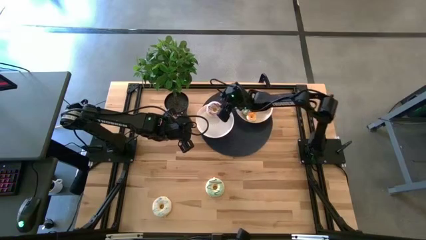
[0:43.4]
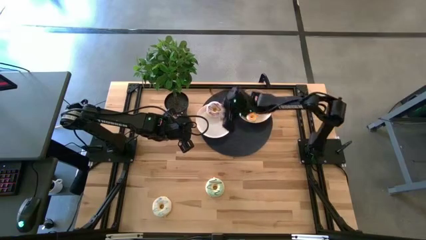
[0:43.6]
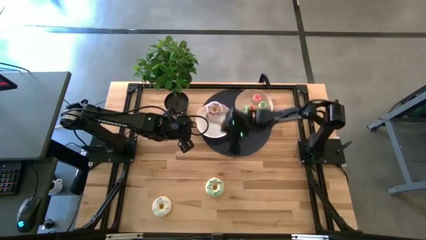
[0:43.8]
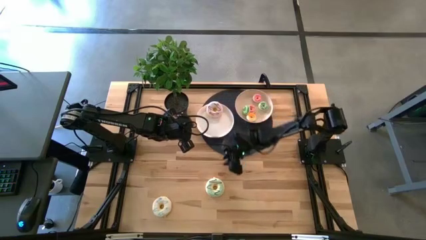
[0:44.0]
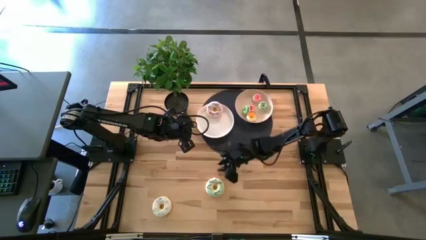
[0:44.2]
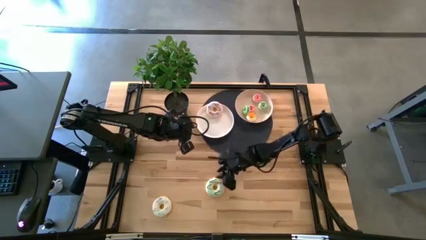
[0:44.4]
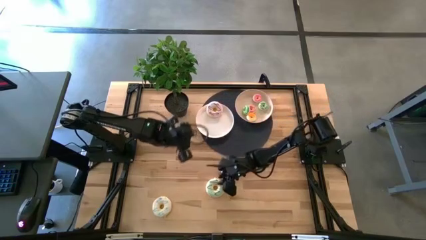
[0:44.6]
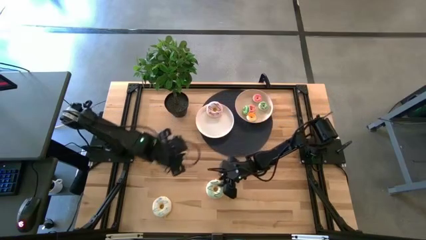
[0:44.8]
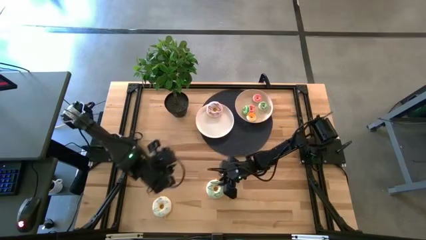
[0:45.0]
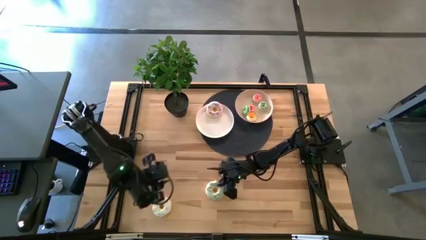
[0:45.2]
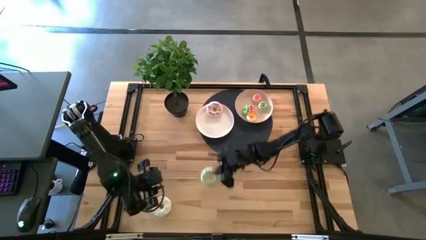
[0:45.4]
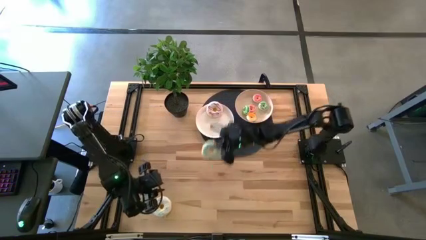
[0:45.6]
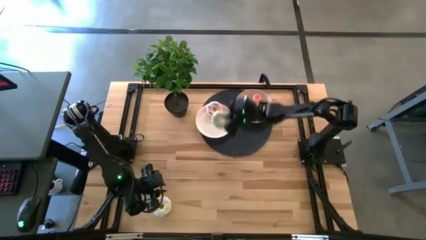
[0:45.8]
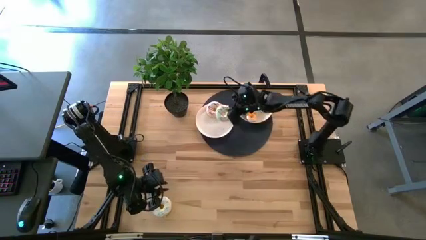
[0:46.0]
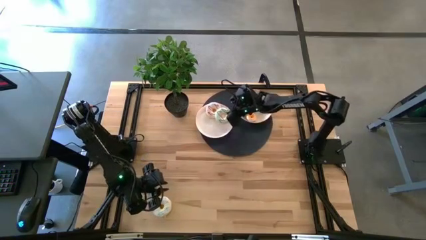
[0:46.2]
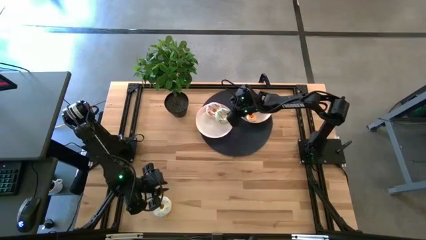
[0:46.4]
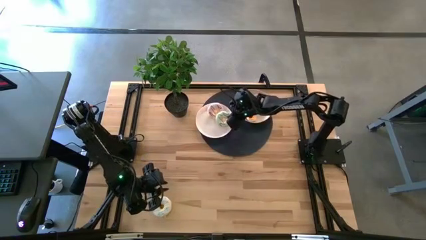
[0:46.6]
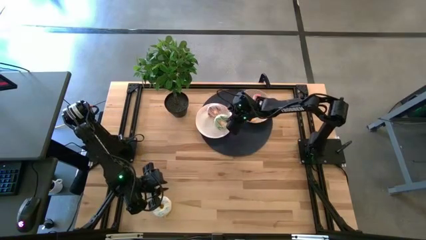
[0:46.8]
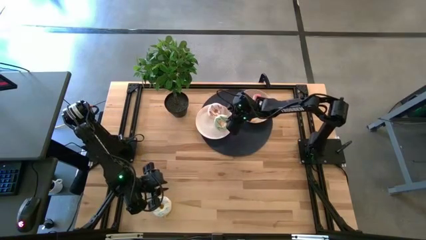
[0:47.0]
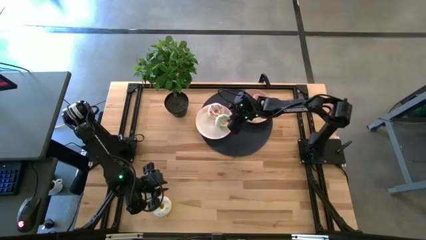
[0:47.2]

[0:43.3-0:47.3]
Task: Pick & Place donuts
Put the large green donut on the white plate

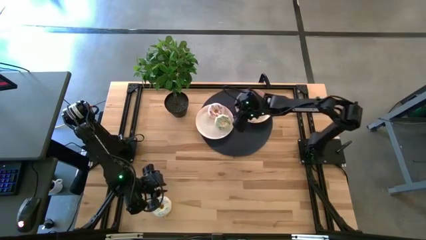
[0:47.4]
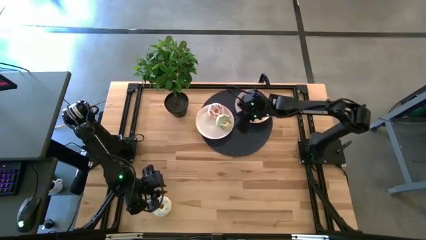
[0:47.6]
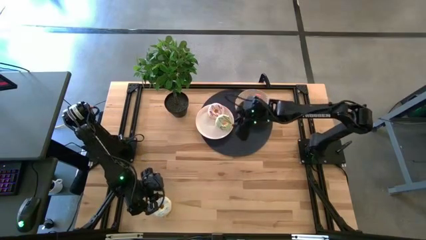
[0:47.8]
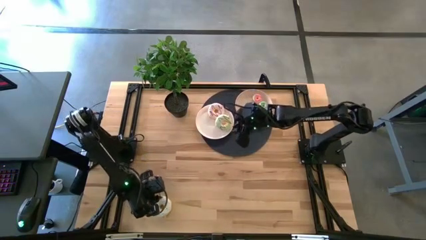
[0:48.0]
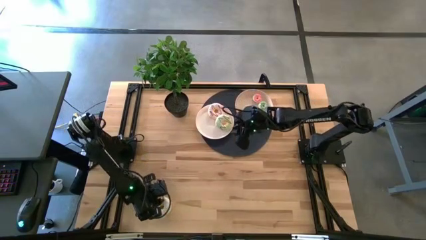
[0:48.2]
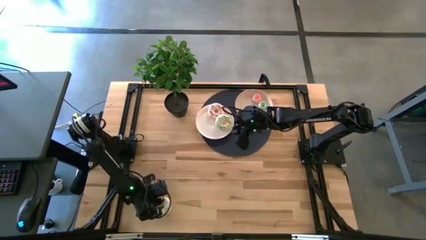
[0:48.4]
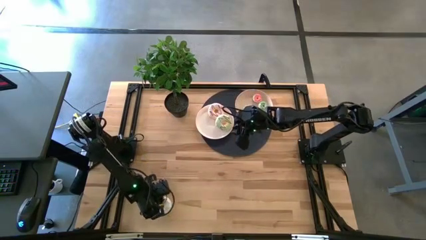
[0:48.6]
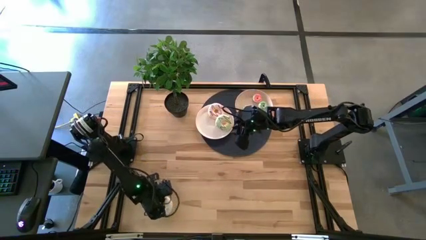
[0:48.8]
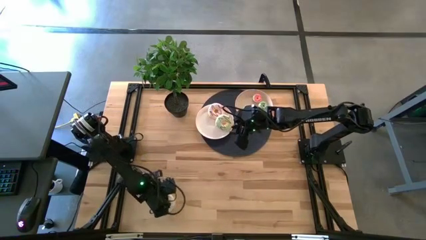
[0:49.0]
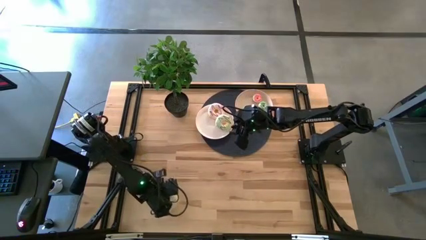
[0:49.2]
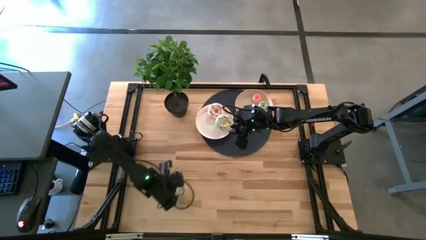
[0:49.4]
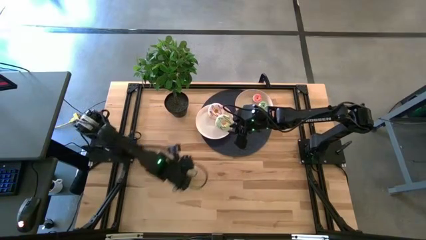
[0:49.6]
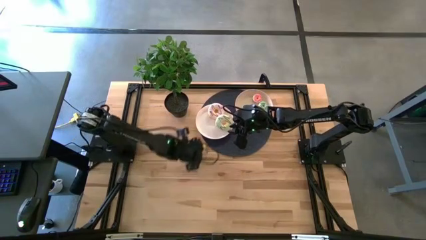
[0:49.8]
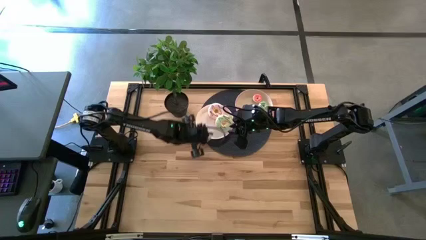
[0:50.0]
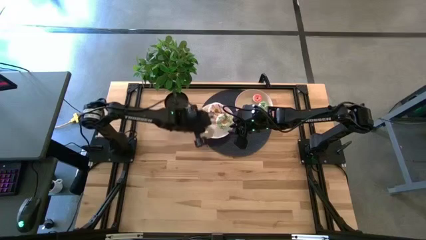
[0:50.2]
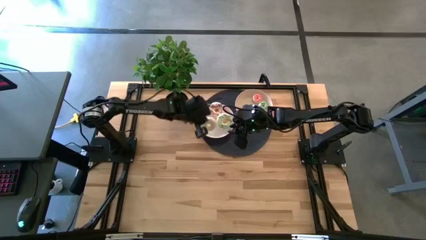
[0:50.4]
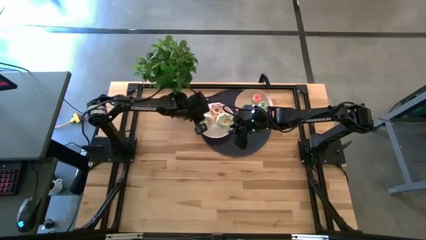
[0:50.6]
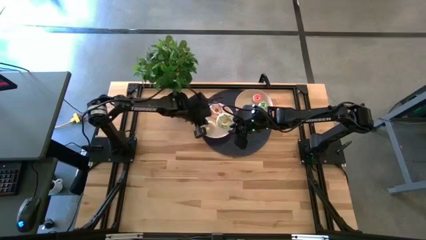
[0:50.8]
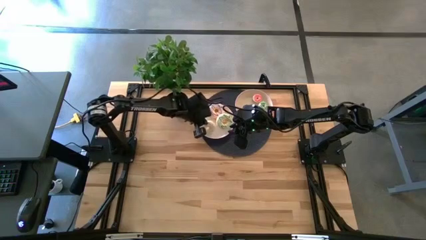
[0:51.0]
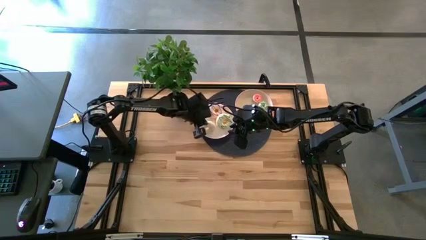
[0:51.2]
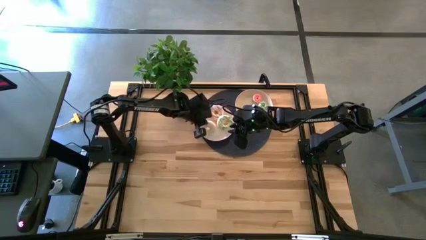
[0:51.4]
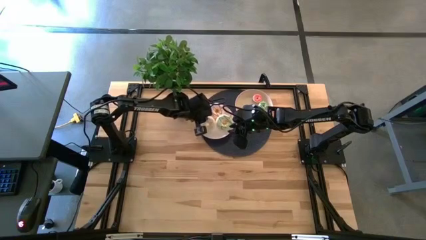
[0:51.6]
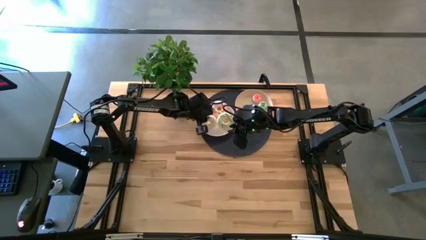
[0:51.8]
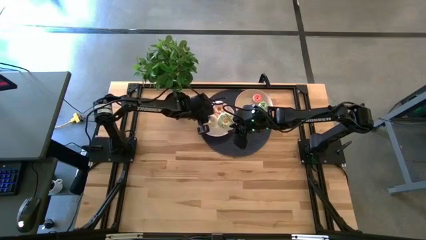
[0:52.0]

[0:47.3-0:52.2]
Put the large white donut on the white plate

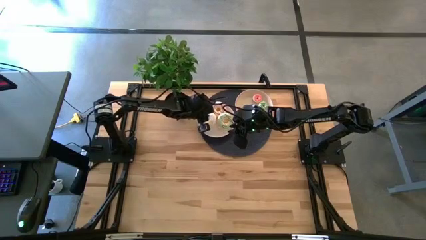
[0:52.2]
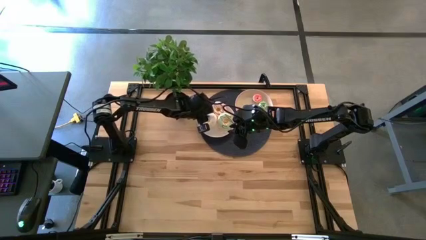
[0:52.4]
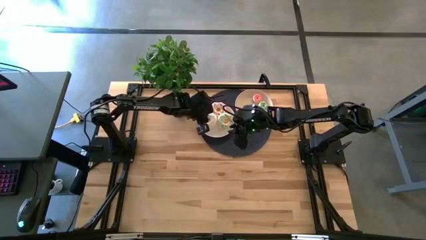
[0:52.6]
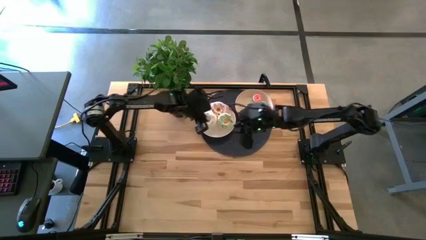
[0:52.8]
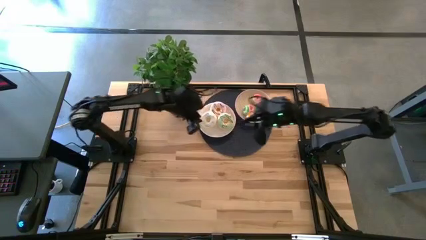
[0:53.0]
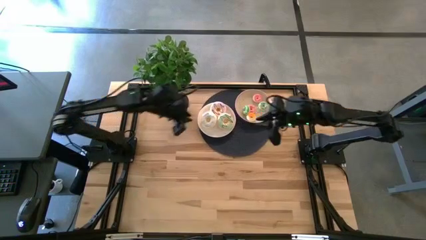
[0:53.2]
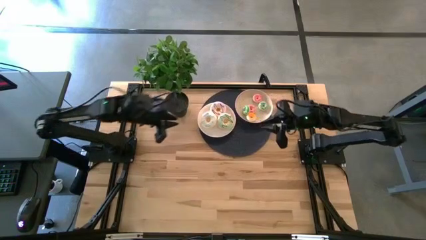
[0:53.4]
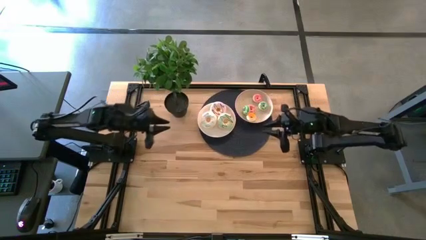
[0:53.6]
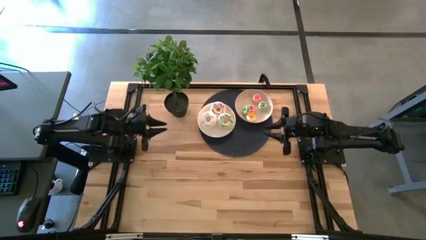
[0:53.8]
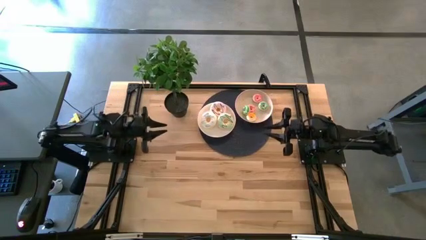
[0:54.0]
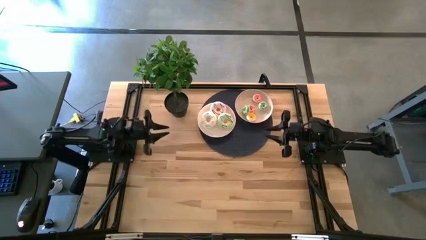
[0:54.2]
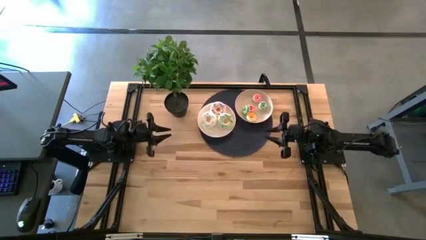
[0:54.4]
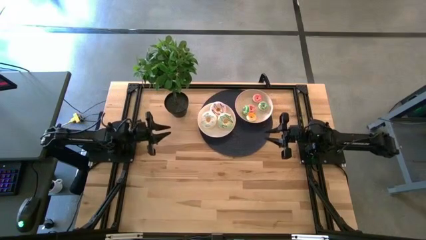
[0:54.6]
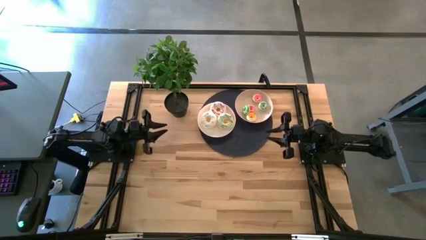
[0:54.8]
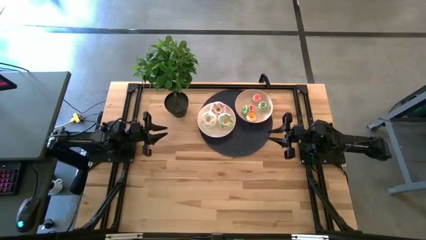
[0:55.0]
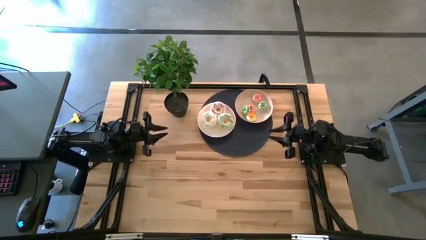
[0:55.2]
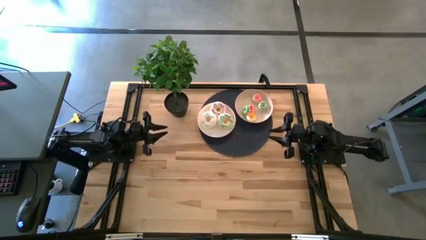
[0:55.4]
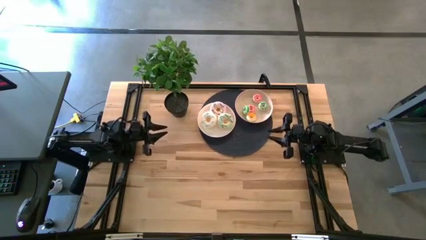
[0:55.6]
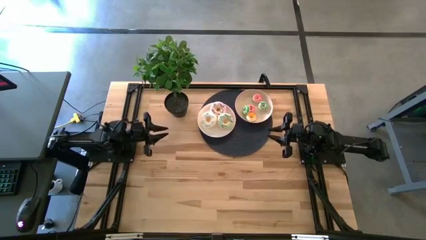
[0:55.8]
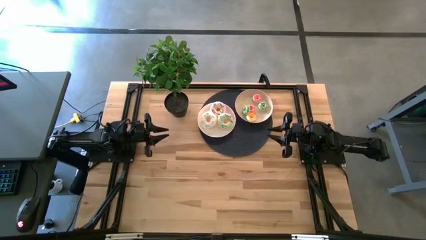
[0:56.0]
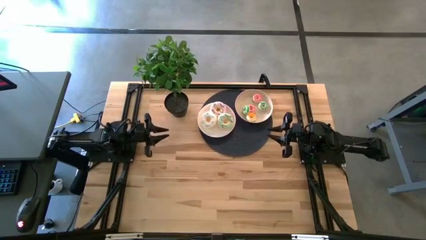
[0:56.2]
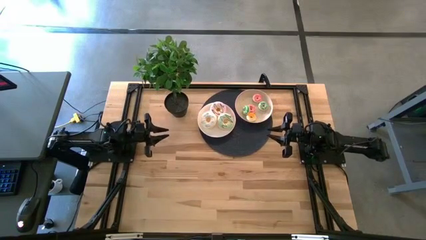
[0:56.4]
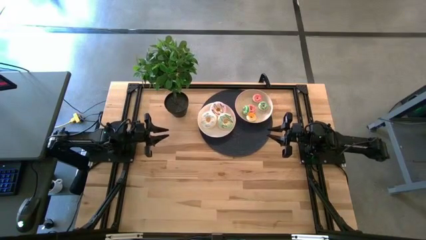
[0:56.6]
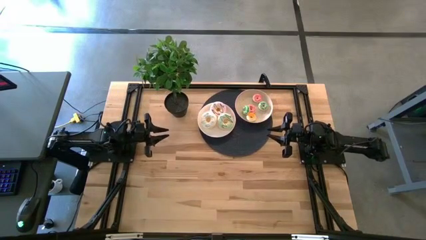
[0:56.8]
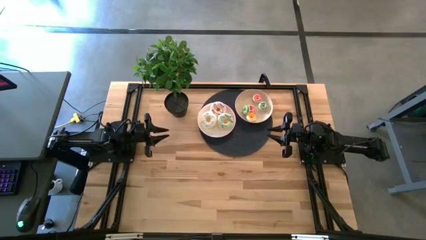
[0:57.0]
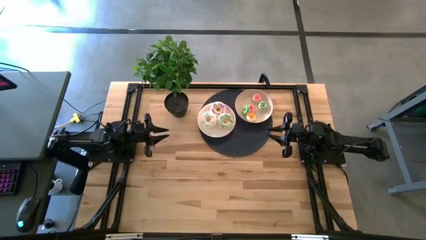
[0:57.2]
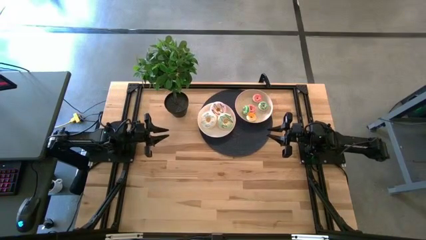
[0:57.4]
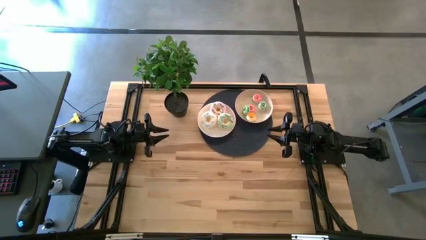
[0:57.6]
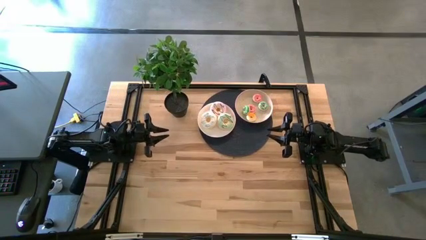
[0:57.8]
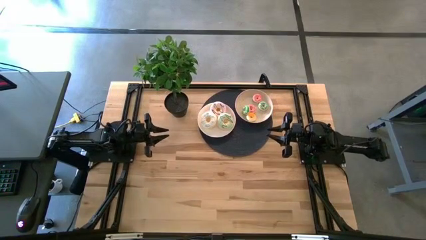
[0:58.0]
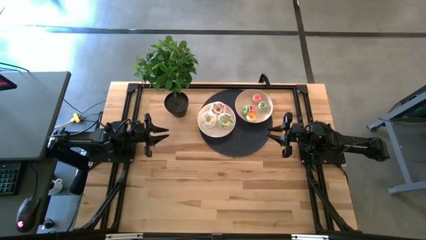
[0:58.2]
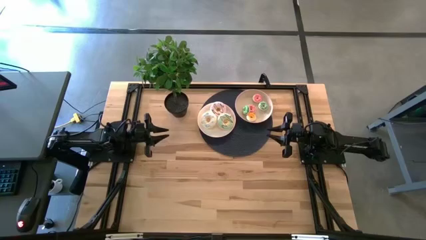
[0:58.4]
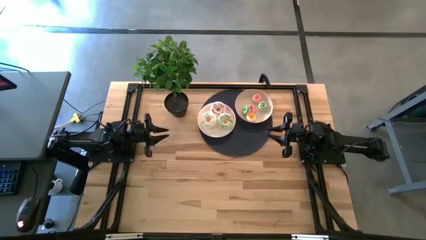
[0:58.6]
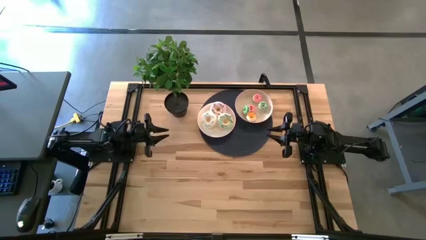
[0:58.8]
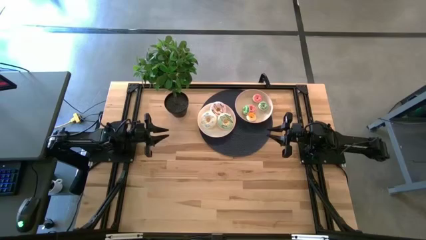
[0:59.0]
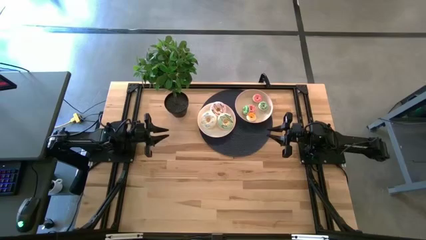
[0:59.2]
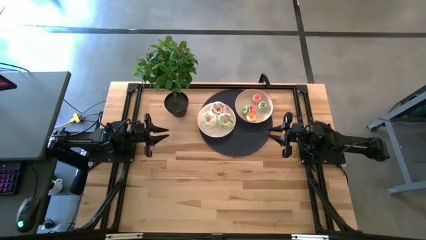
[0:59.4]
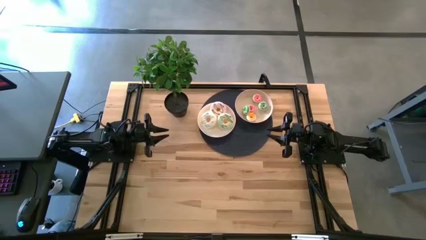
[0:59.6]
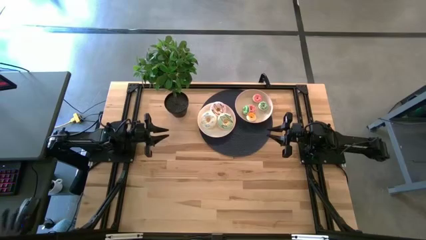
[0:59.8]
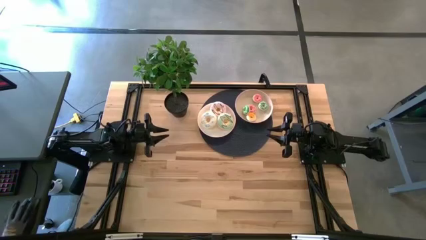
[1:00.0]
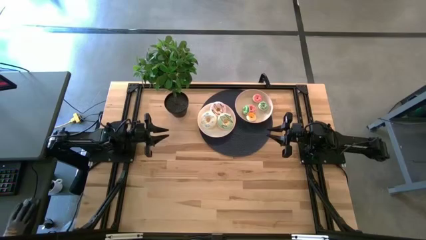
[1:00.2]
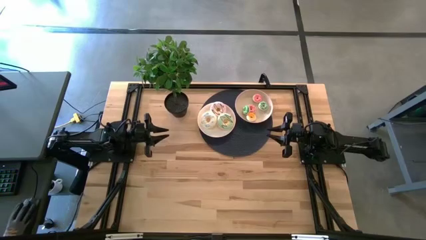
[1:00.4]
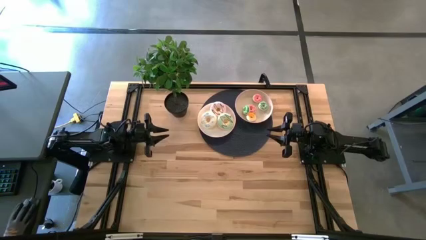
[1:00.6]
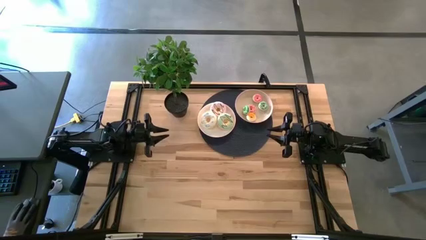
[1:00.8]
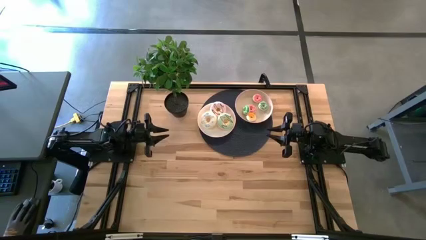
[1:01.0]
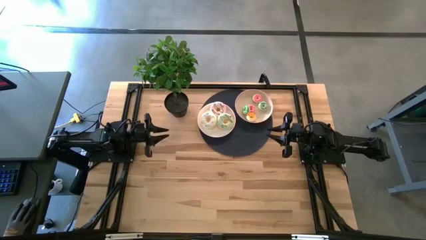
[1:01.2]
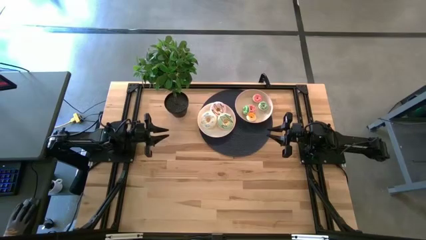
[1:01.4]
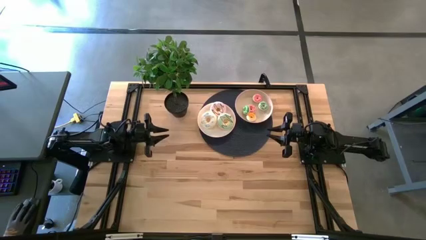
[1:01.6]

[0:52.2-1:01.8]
Return to home position
